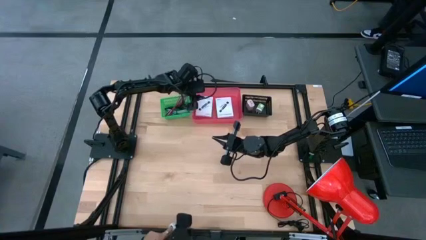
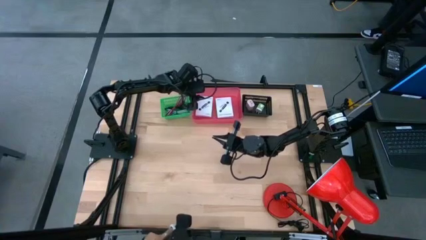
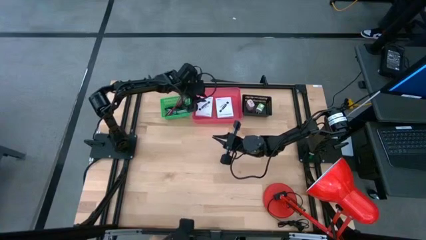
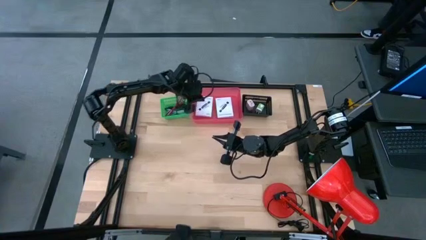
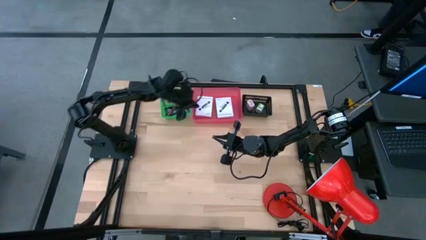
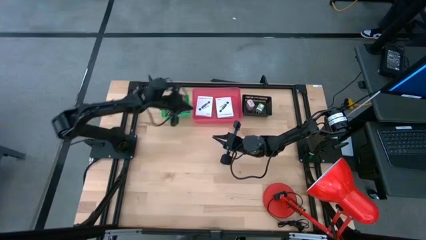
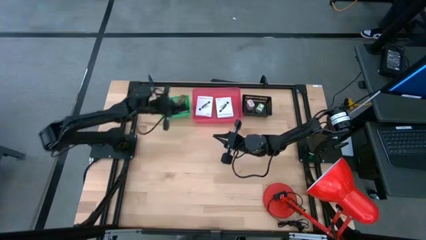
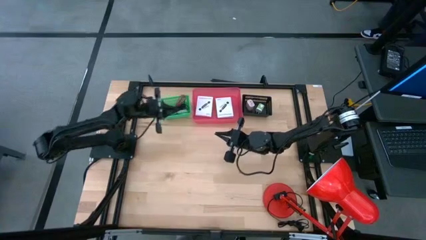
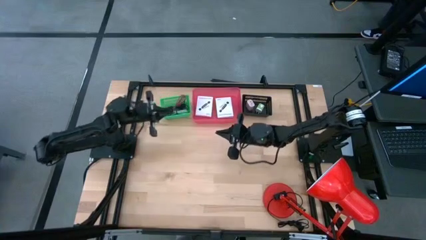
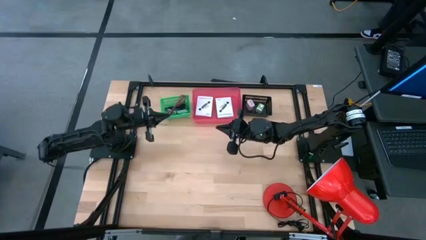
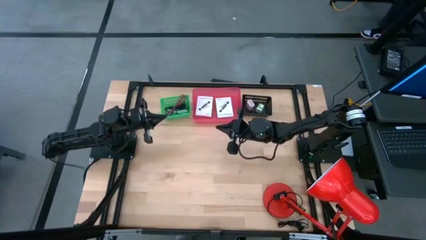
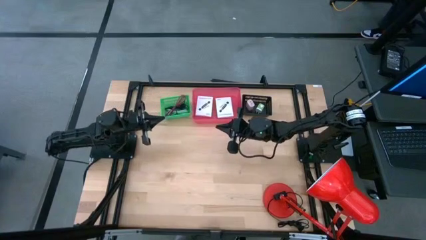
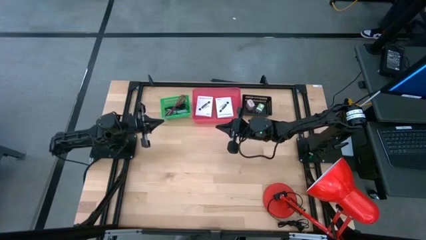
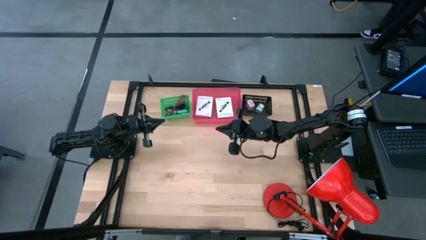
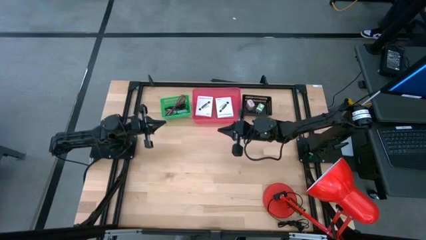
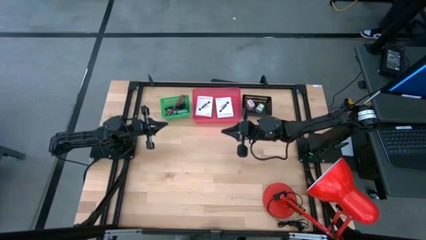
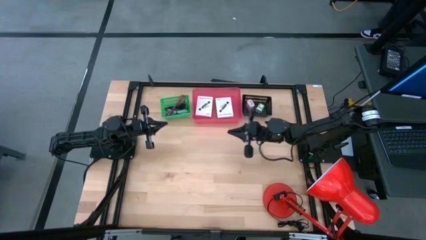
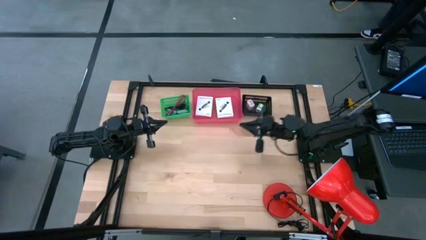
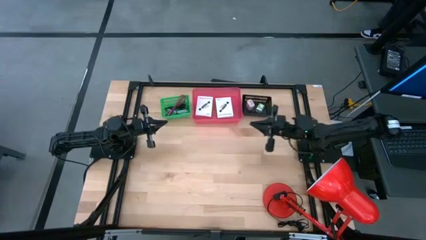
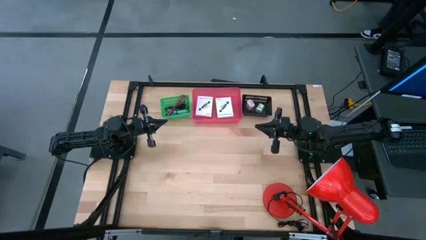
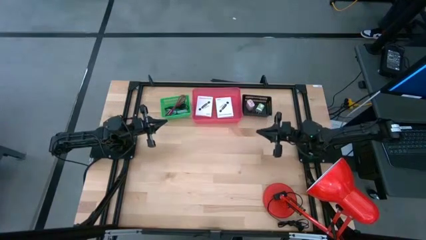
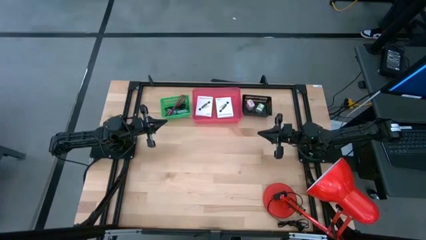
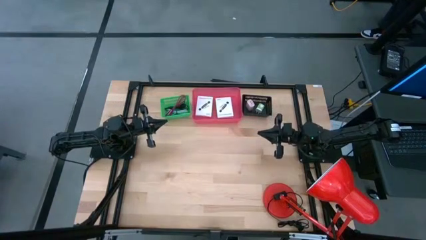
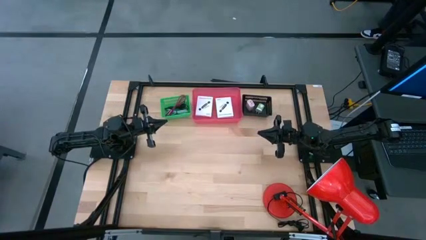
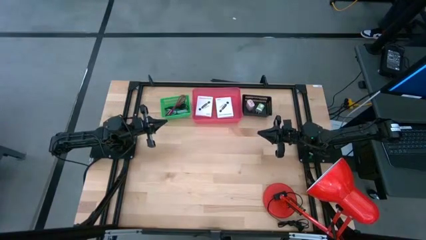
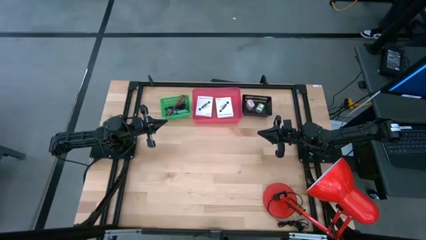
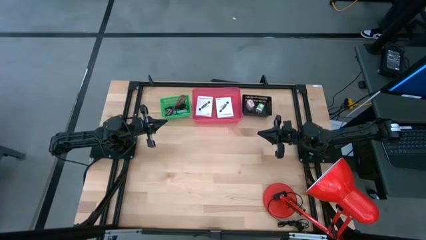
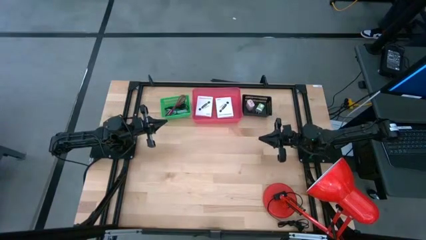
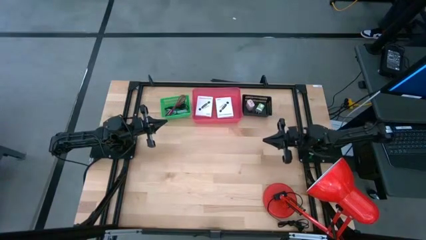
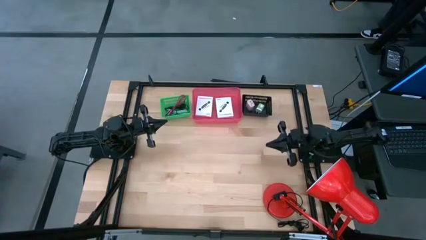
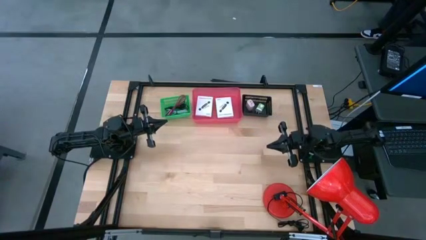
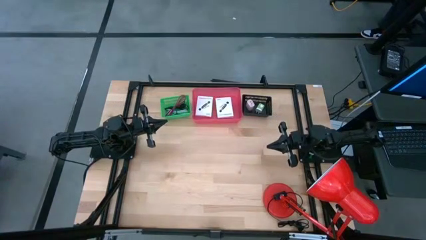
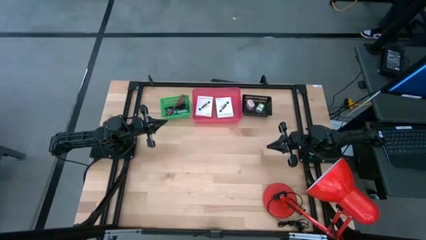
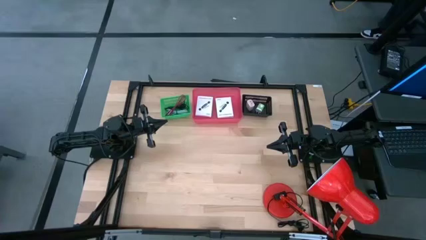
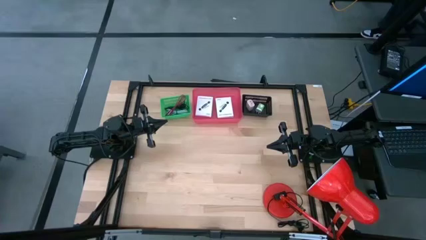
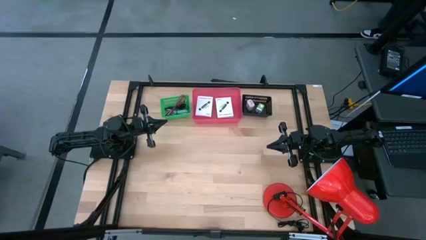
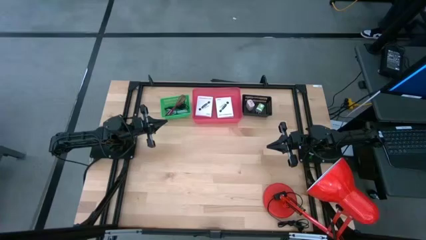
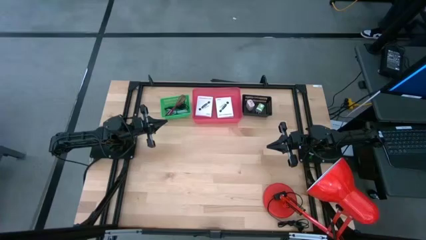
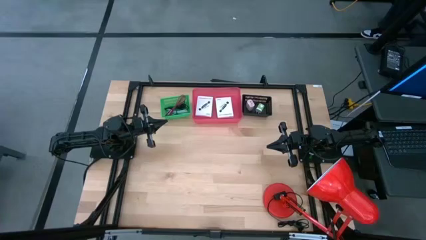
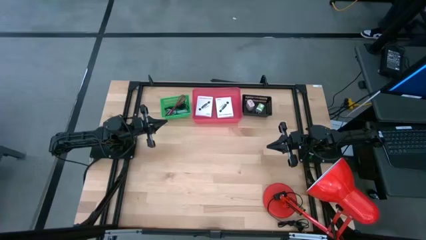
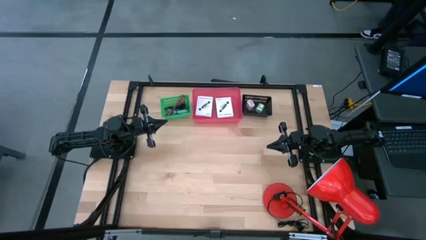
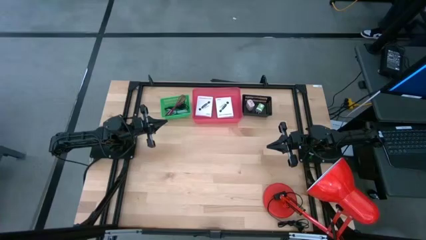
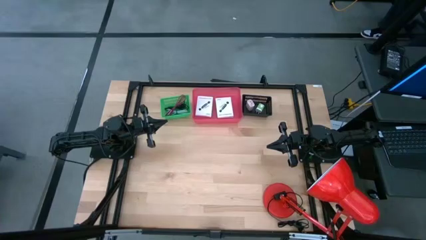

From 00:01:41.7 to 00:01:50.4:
Task: Pick and place items into bin
Return to Home Position

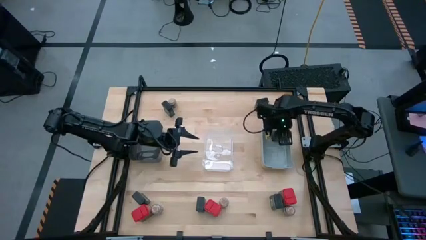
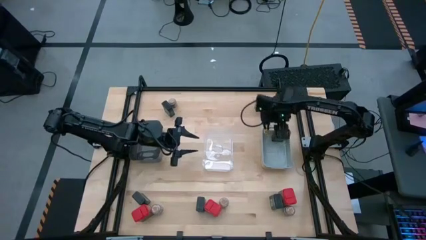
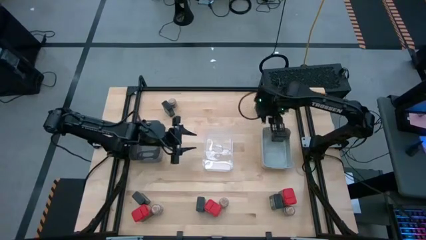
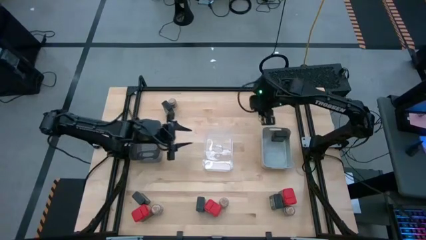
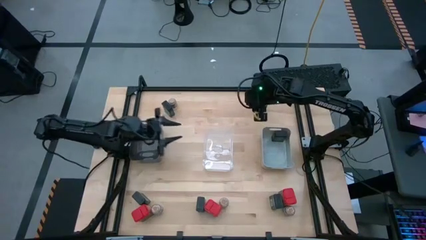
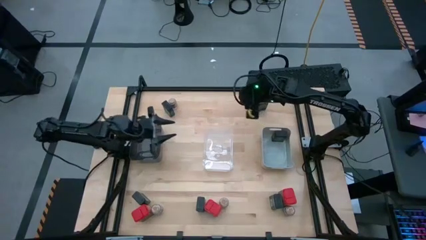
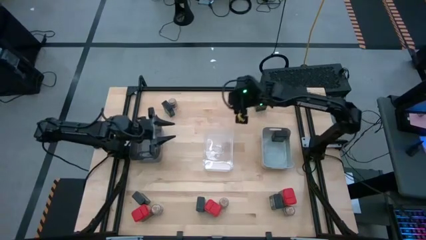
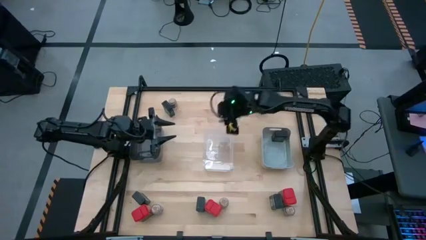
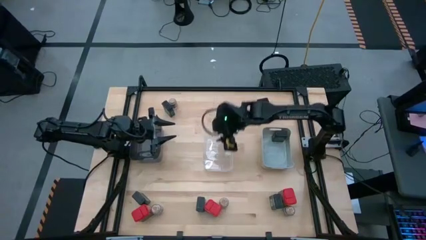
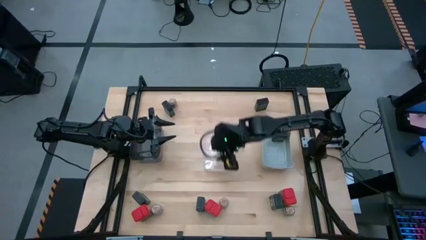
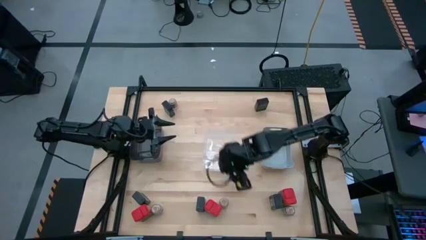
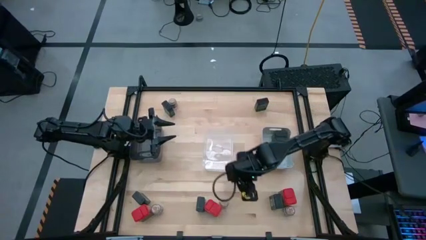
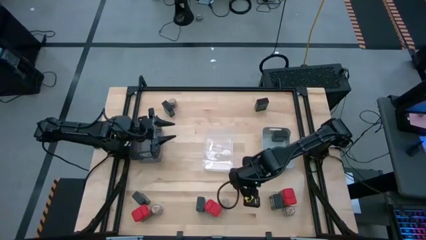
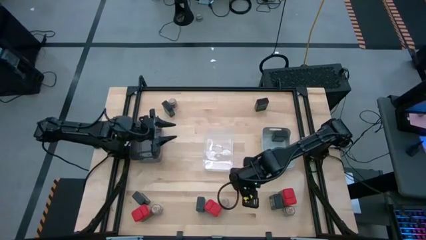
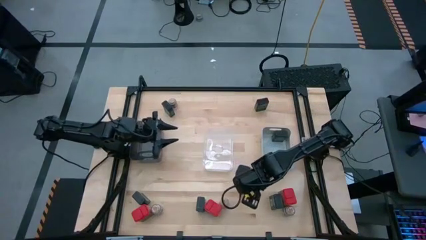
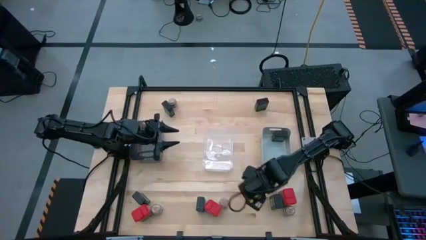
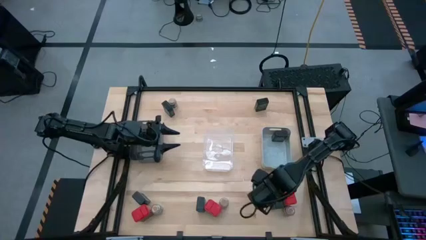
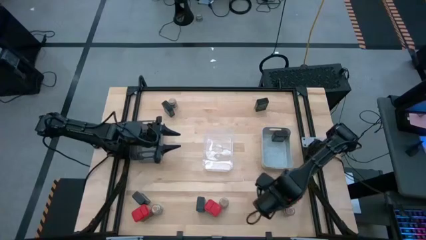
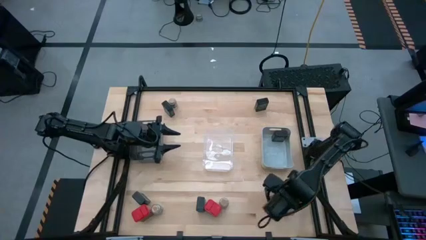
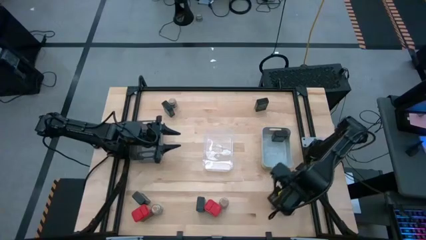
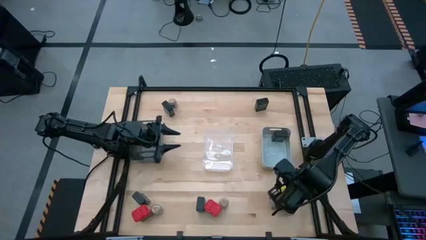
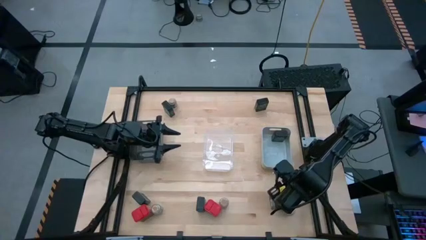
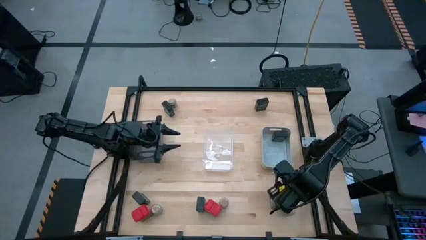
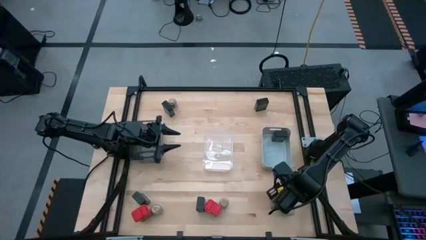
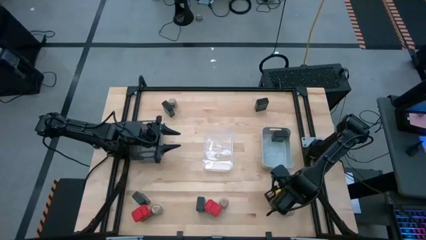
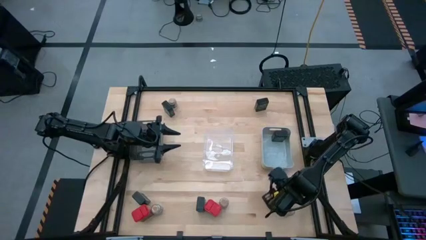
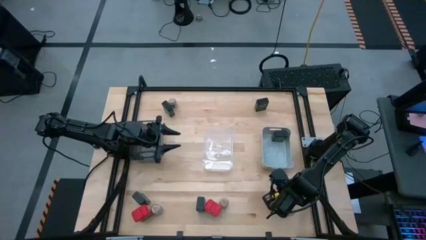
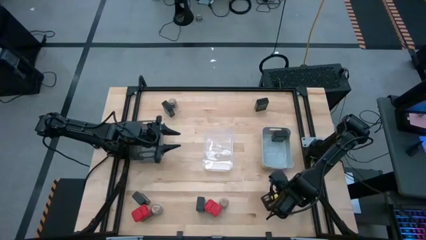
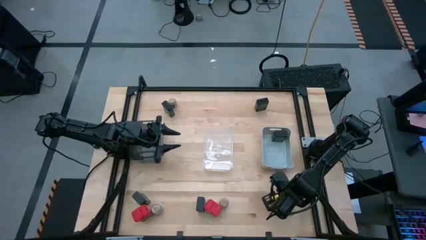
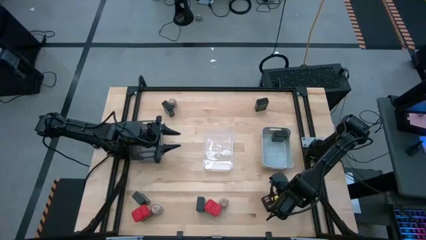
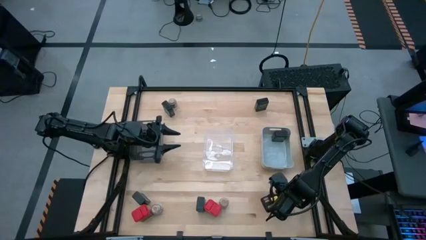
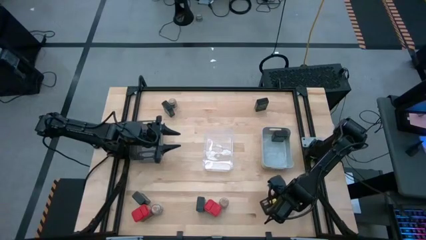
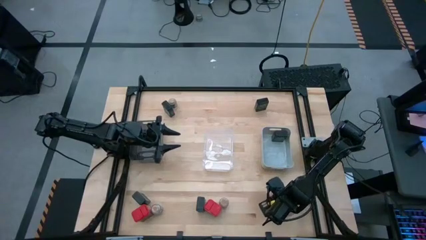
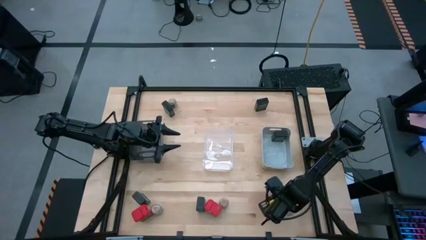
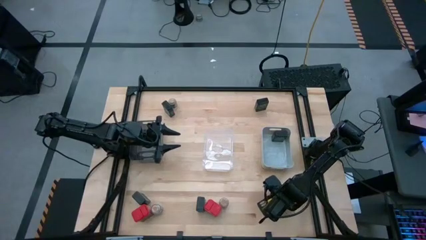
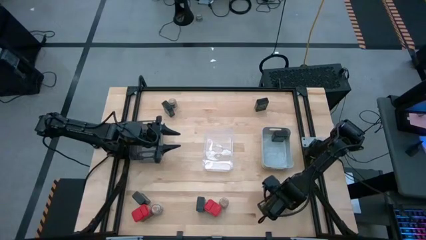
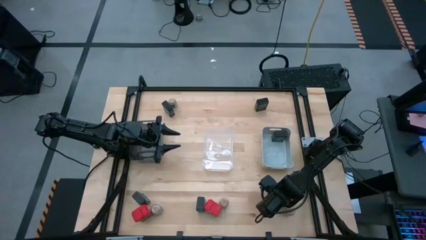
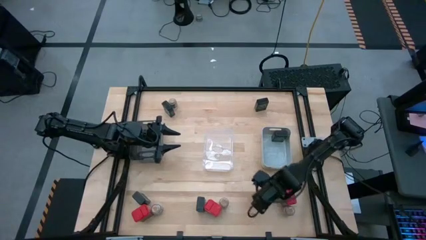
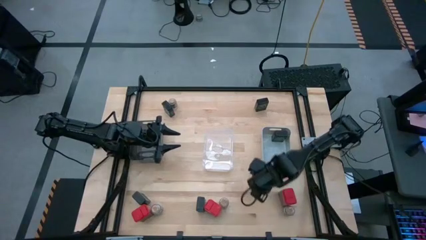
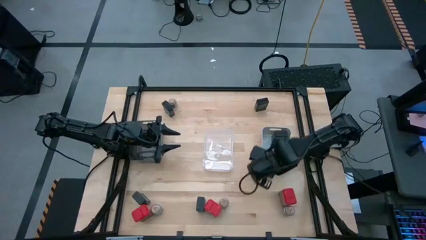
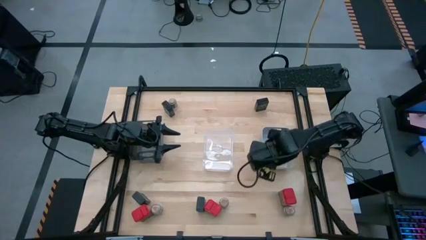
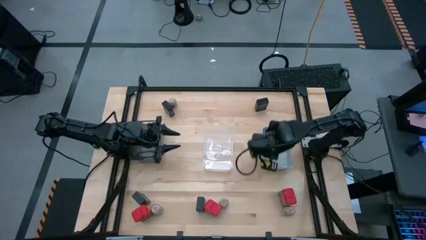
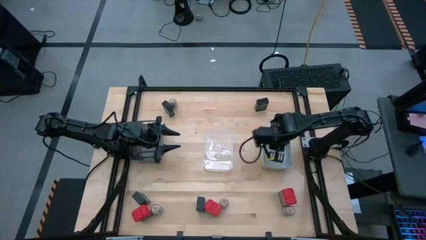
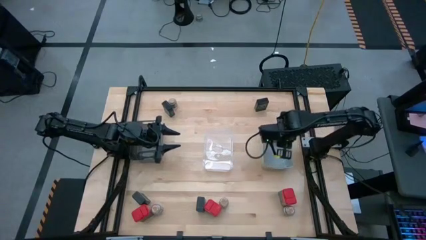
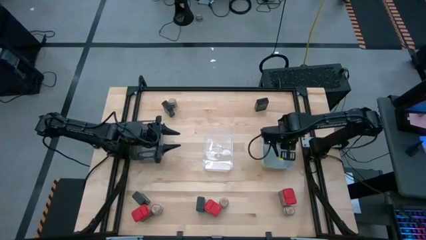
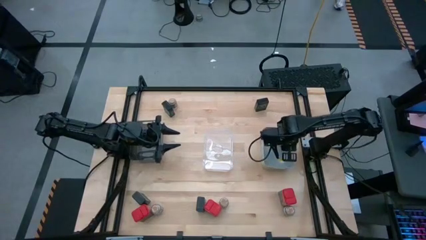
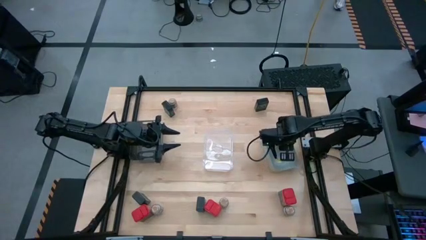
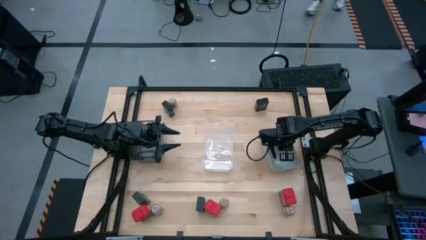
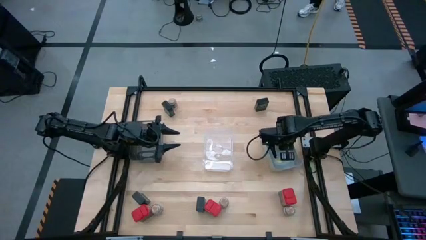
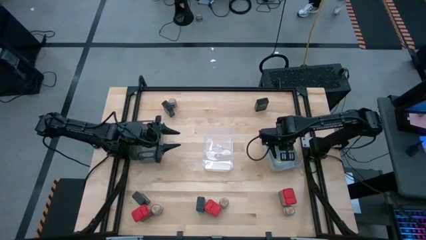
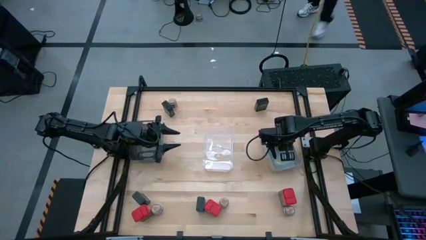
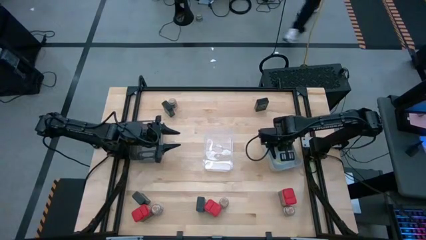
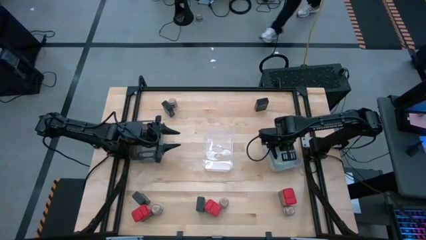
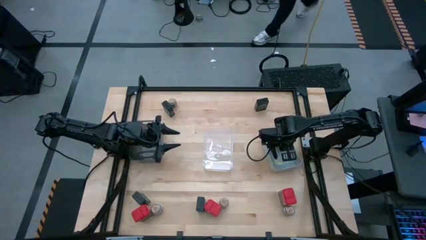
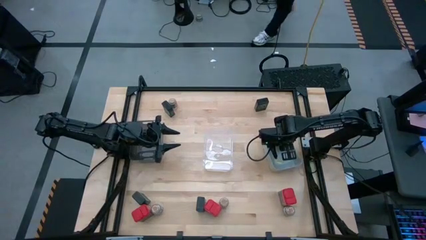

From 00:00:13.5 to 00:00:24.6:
Task: Sort spices by type
Put the black seasoning can into the gray bin
